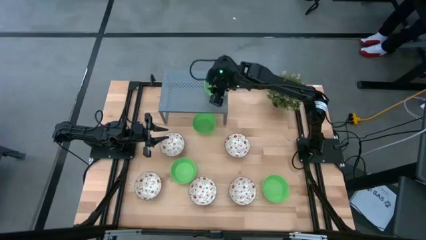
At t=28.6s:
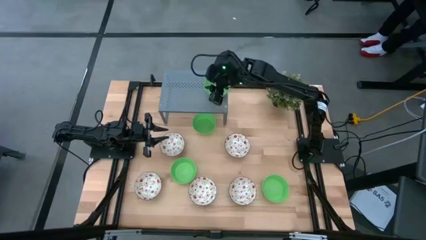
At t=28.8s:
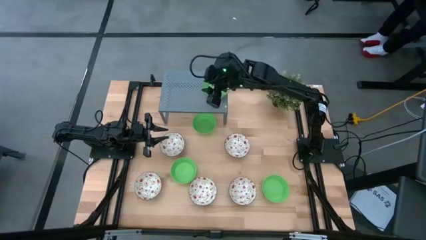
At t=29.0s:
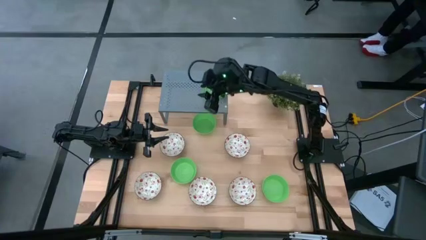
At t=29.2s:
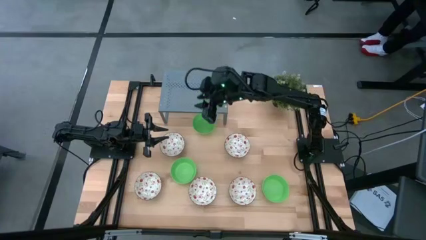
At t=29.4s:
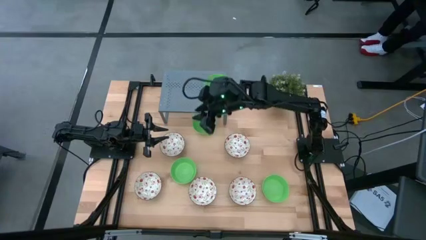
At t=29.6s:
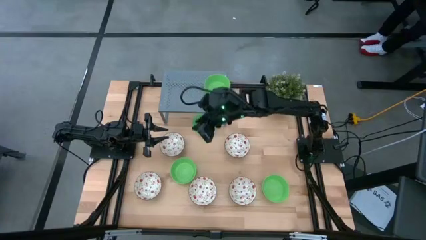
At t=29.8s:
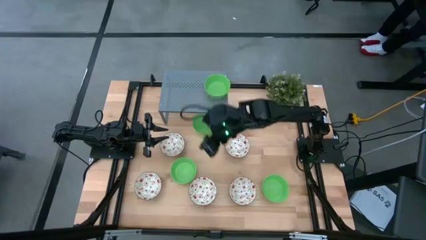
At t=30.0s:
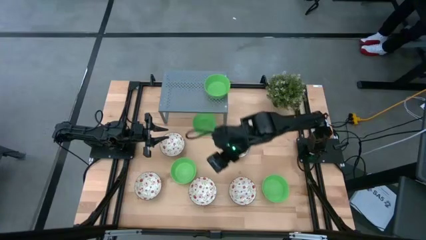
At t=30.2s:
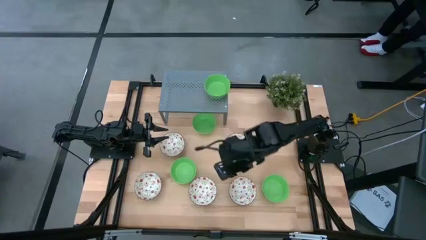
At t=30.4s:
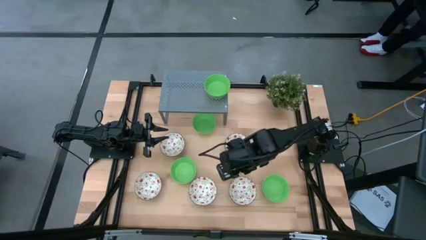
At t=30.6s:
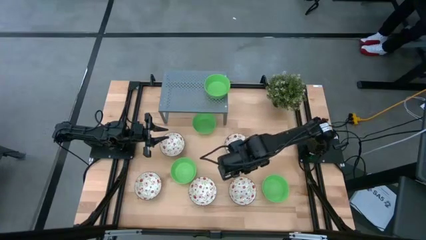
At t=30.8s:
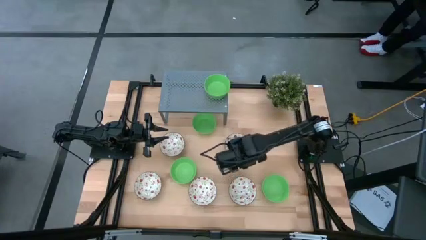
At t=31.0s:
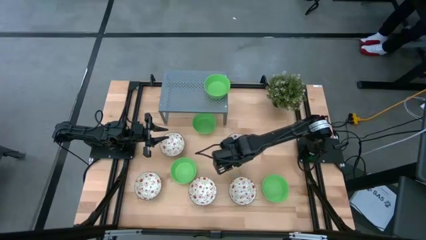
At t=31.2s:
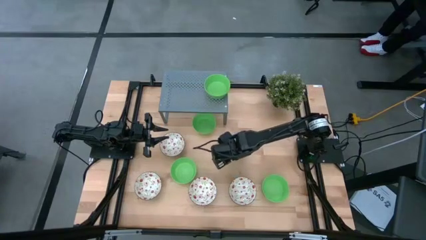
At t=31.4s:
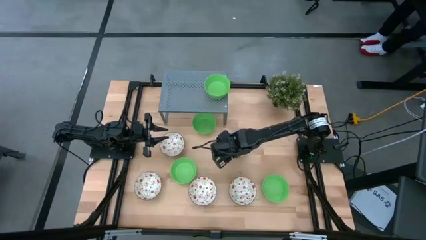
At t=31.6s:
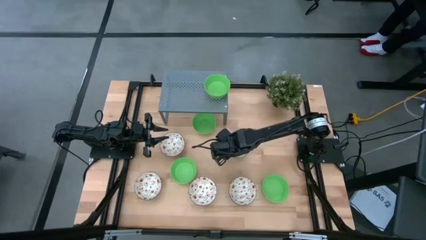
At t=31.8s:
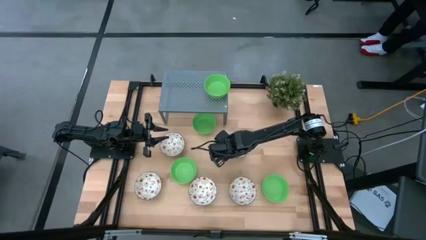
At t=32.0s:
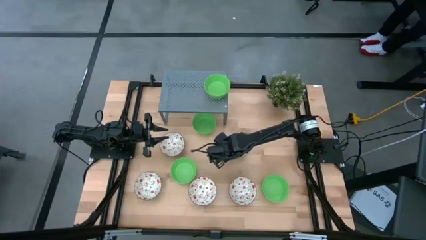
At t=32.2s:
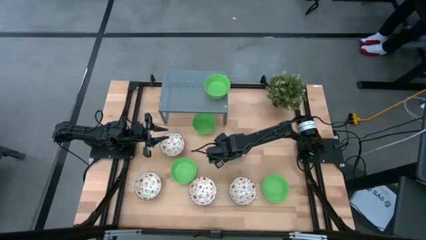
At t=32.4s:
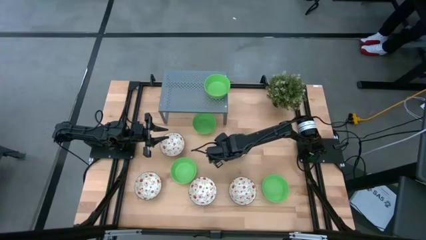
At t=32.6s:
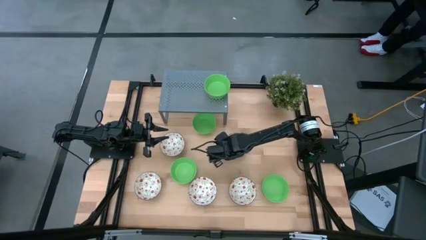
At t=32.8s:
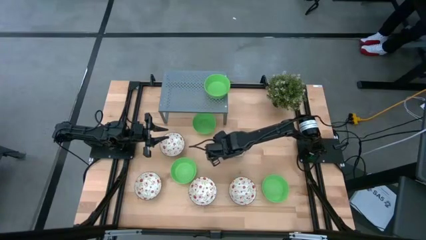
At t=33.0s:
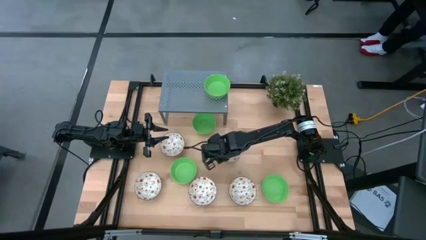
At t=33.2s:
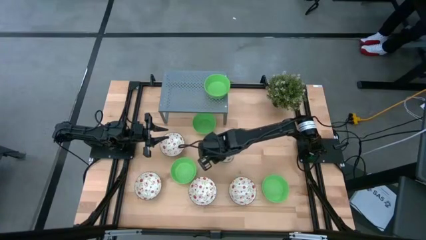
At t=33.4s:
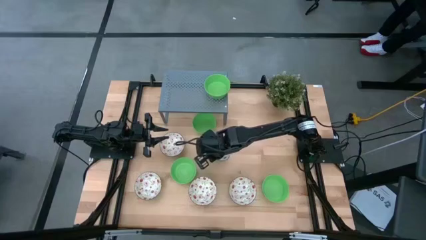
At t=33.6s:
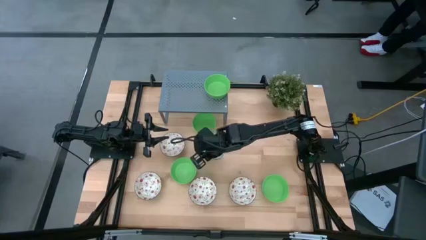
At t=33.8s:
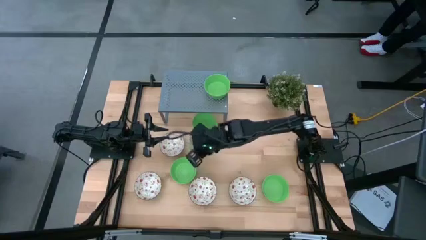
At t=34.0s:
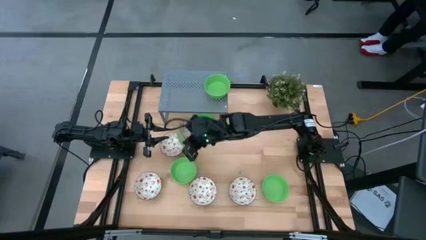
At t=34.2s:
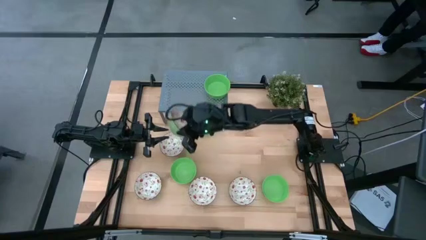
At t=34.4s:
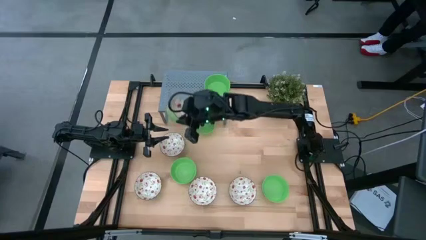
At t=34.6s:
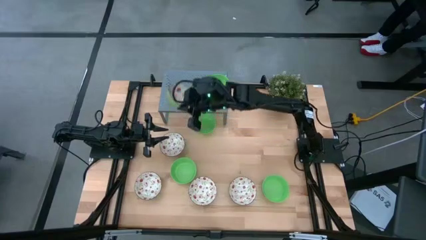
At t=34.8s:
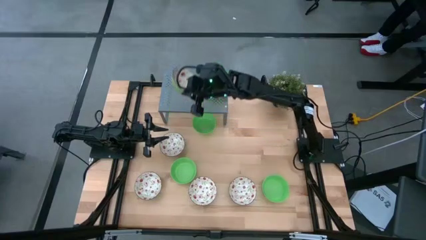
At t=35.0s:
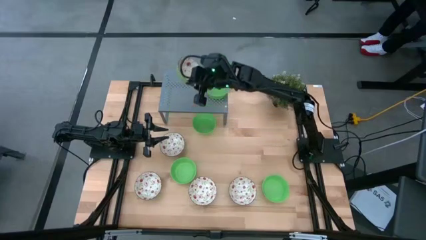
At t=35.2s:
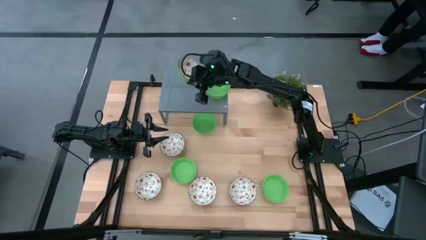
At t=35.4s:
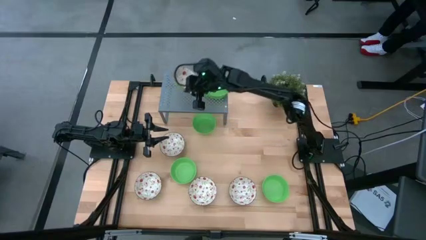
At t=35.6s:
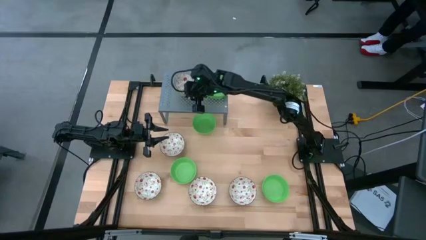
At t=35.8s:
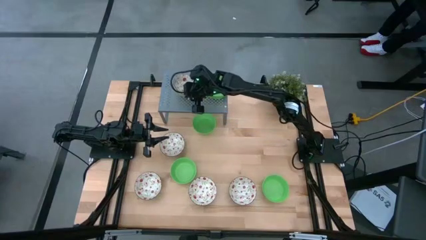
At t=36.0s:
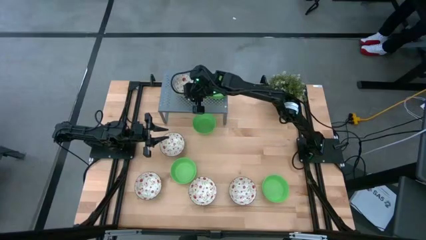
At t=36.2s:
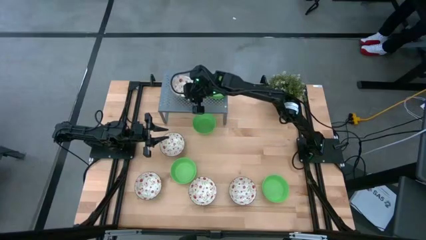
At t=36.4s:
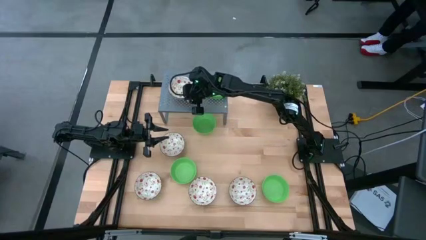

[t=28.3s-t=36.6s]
Task: Pick & Place Mini bowls
Put the white patterned bowl on the shelf

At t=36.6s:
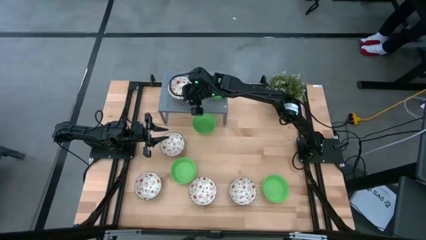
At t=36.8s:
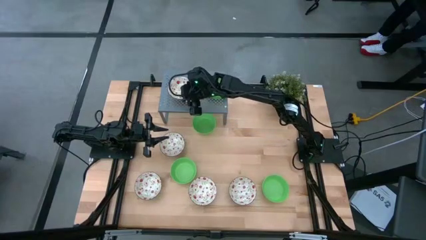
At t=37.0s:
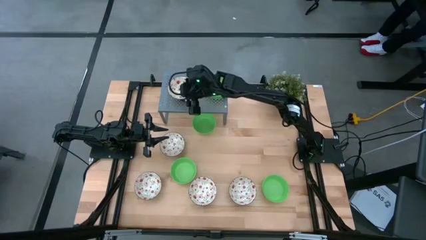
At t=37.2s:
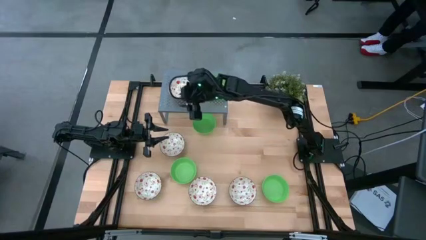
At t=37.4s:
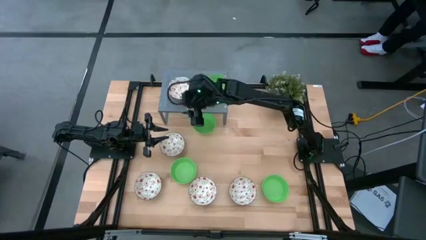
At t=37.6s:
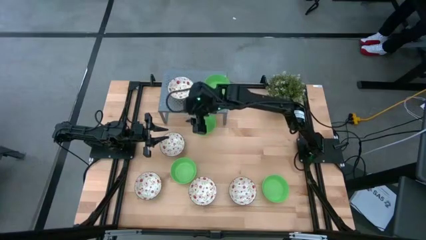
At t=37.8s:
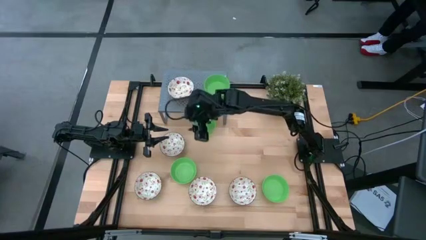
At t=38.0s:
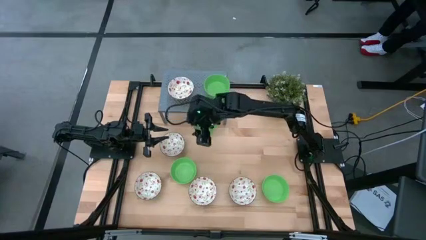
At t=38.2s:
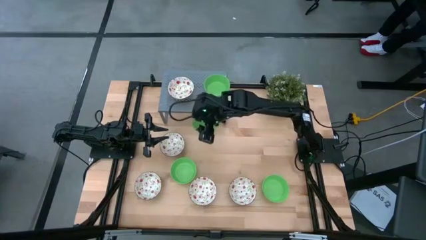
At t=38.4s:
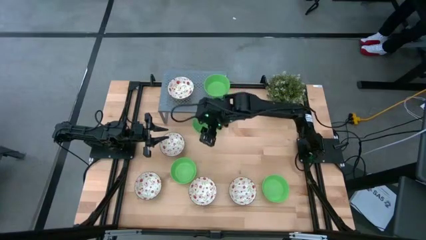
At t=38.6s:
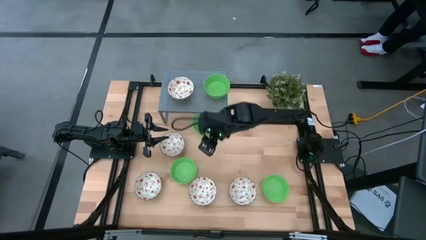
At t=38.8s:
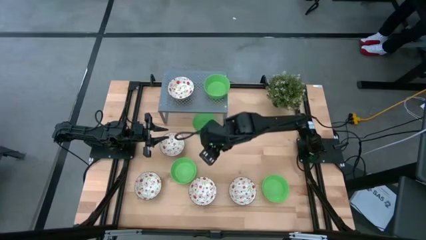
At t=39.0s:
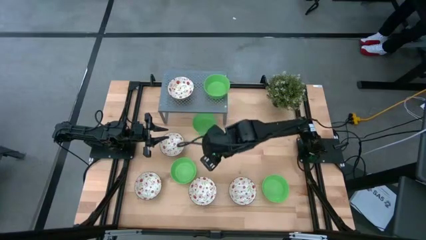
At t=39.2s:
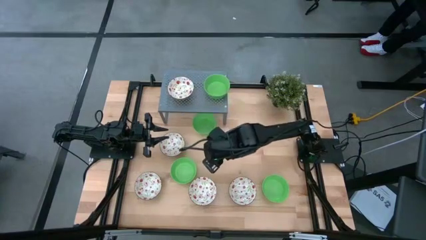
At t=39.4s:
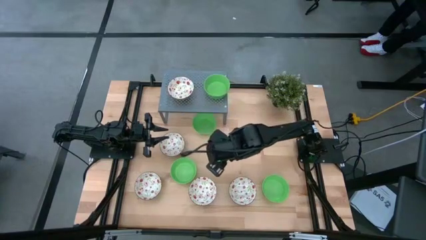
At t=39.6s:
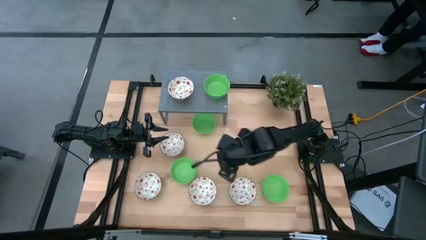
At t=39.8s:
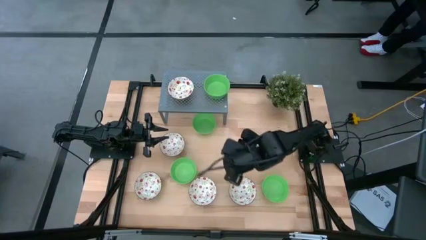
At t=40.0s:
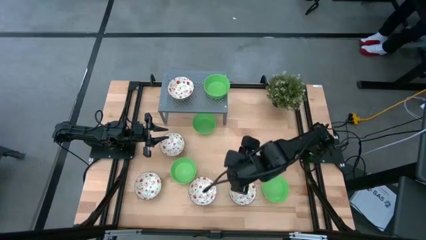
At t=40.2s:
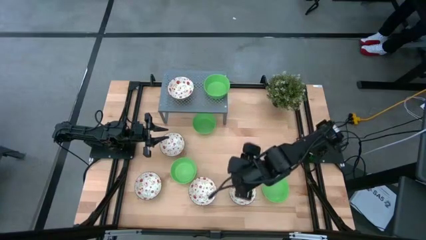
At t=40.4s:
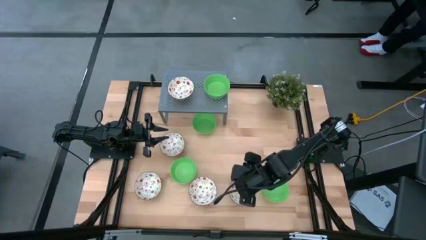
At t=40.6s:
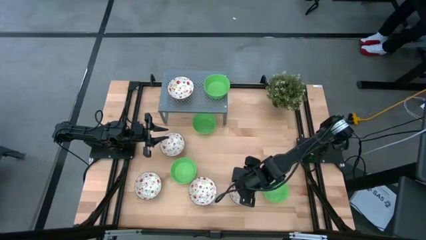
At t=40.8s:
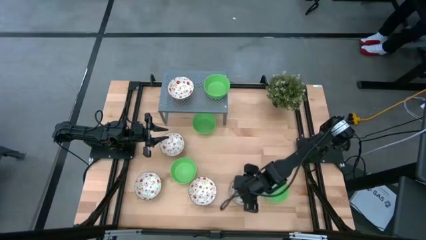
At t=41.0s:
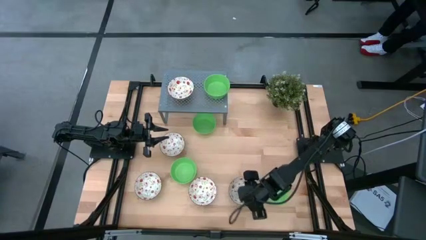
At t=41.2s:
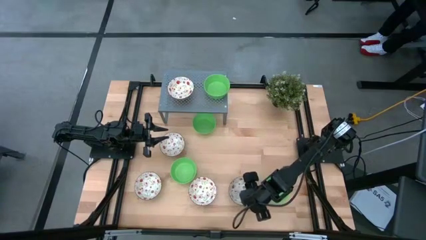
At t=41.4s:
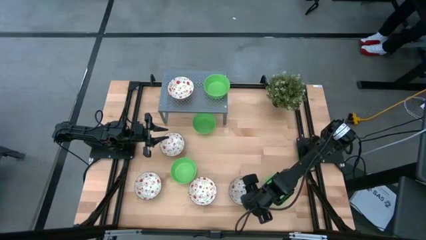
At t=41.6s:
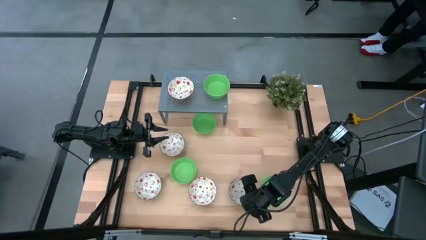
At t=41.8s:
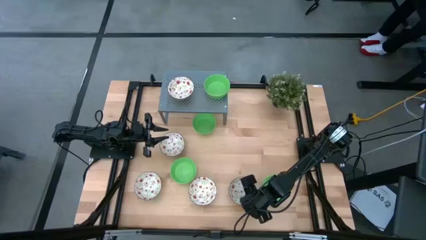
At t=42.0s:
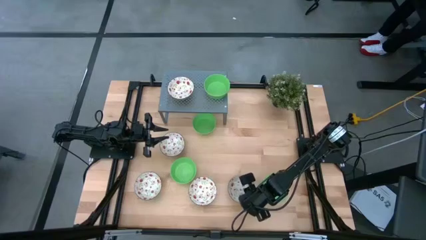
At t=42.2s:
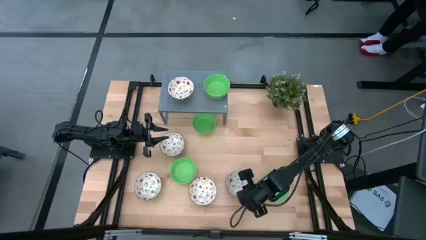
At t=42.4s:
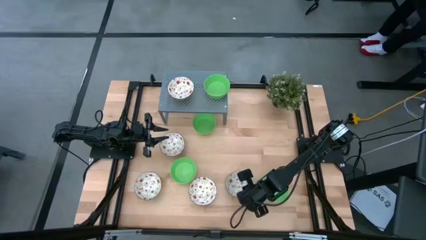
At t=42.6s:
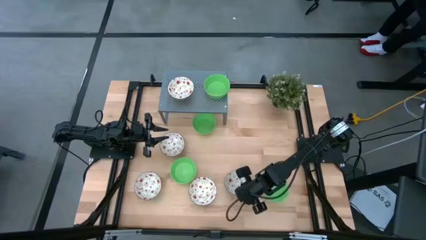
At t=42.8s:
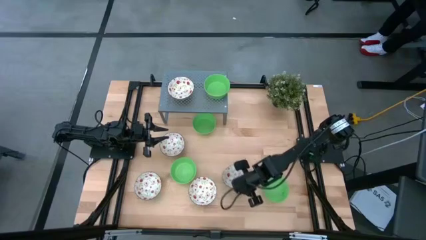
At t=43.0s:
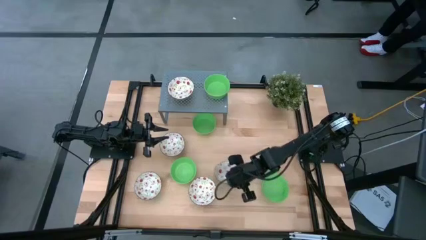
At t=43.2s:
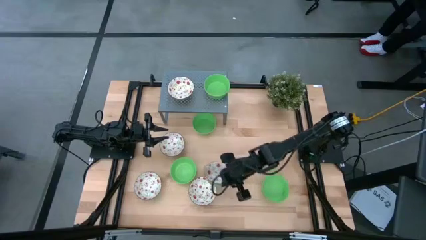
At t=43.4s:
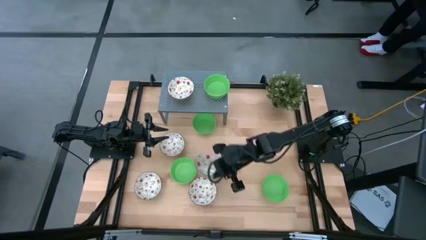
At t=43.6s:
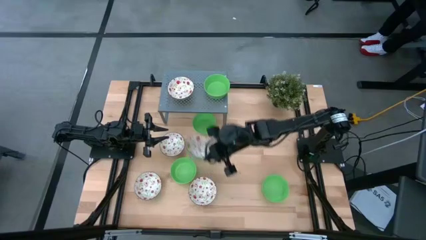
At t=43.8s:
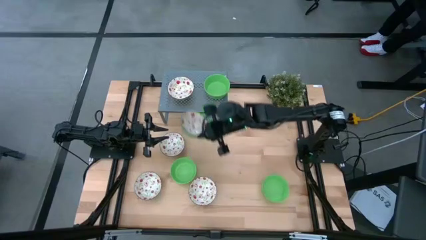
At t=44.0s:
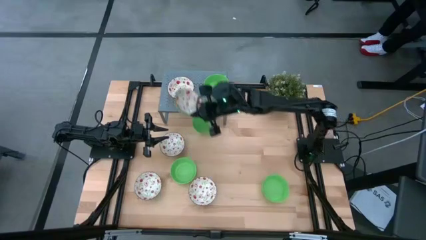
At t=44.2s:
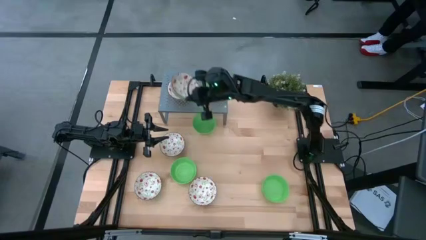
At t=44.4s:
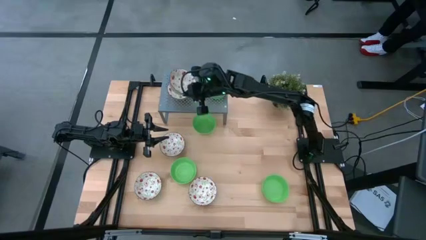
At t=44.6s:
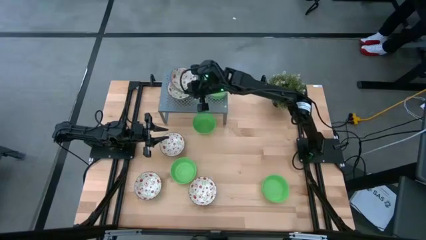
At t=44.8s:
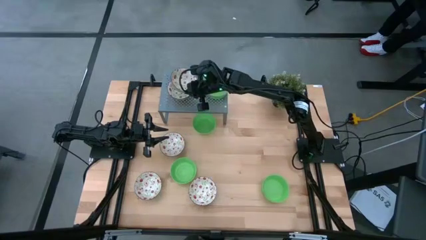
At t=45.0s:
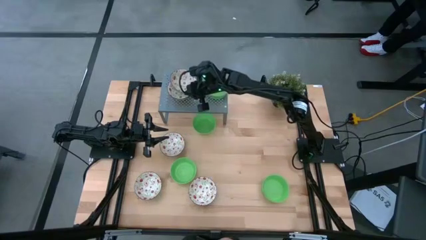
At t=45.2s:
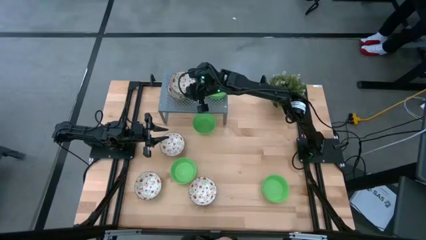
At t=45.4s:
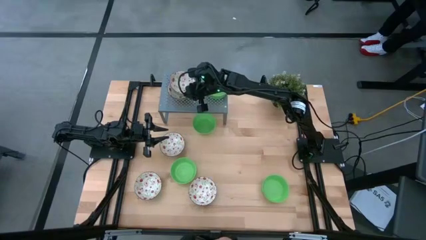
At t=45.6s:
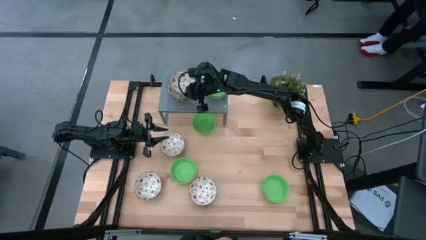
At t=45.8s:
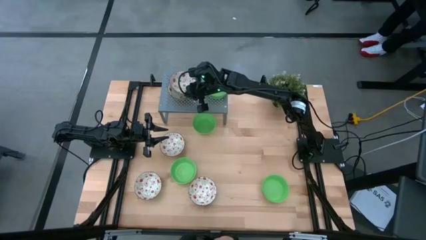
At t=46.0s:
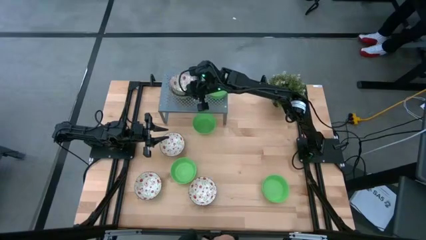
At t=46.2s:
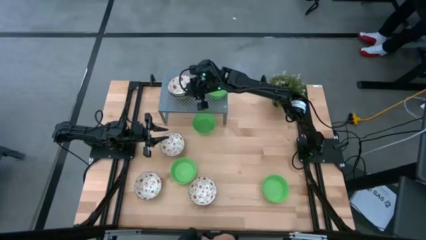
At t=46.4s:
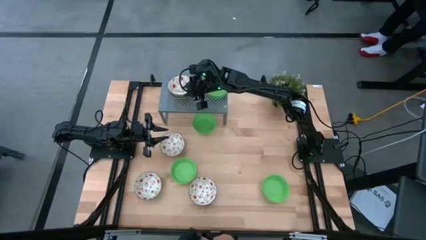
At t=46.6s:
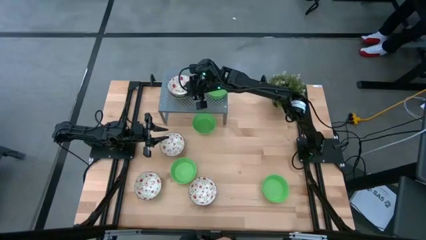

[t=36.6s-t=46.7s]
Stack the white patterned bowl on the white patterned bowl on the shelf
